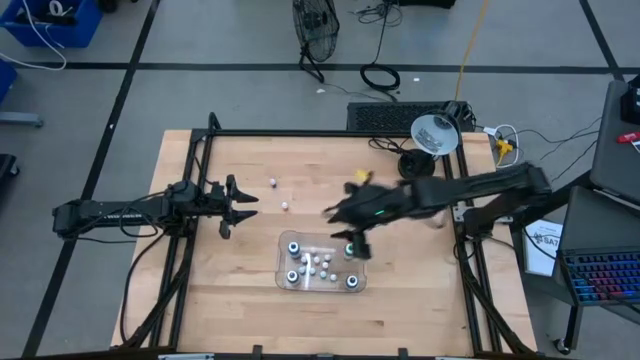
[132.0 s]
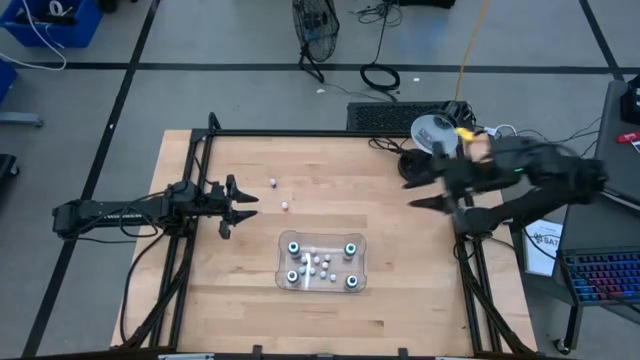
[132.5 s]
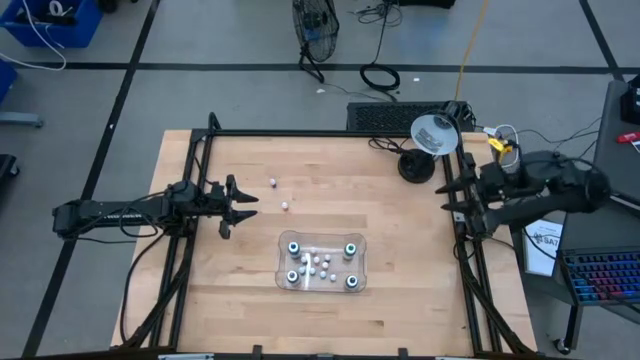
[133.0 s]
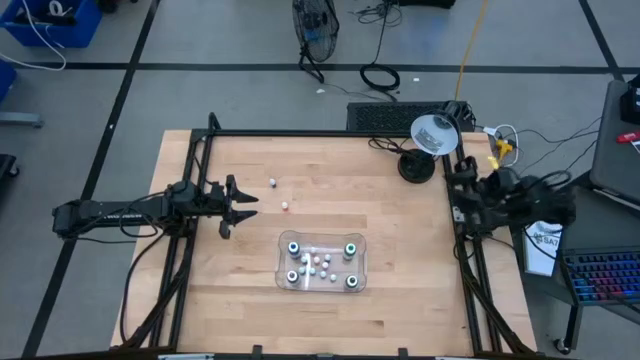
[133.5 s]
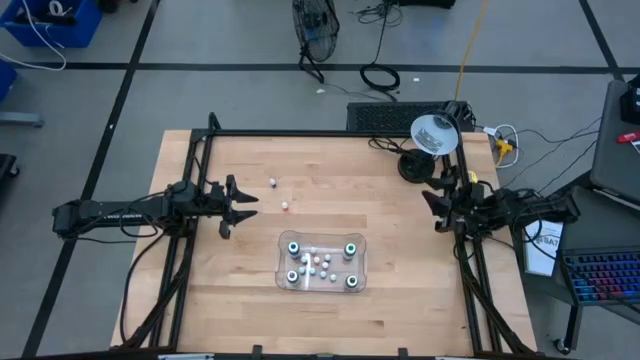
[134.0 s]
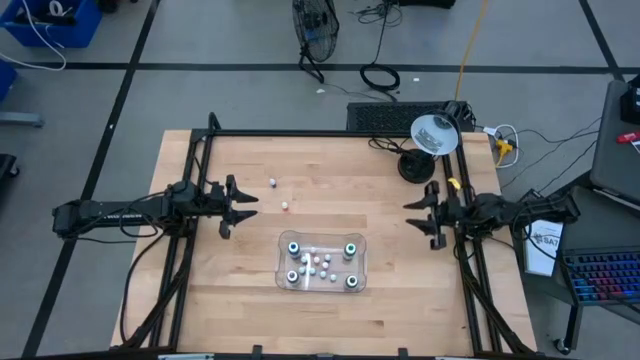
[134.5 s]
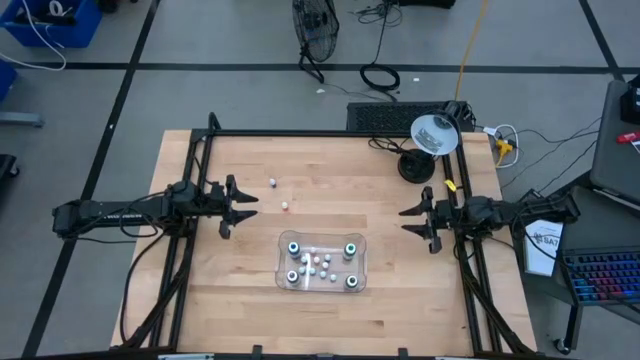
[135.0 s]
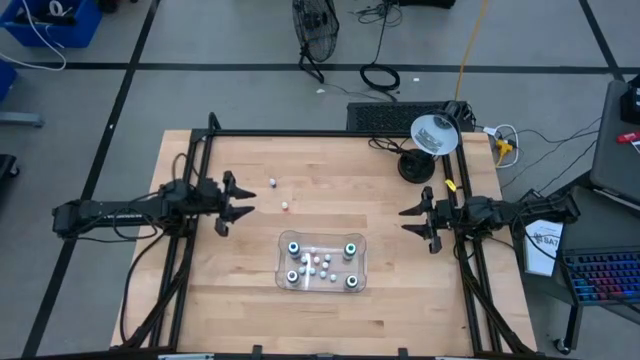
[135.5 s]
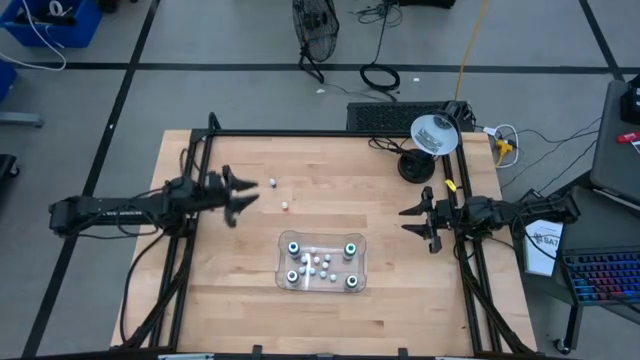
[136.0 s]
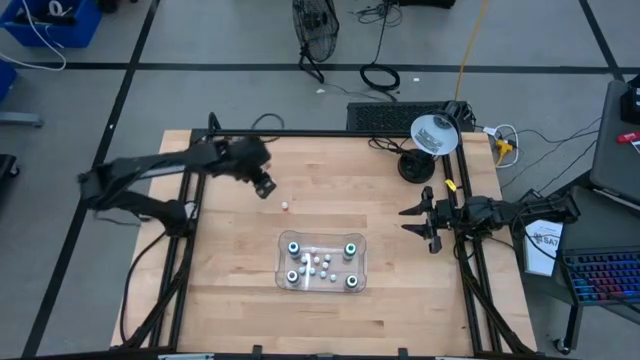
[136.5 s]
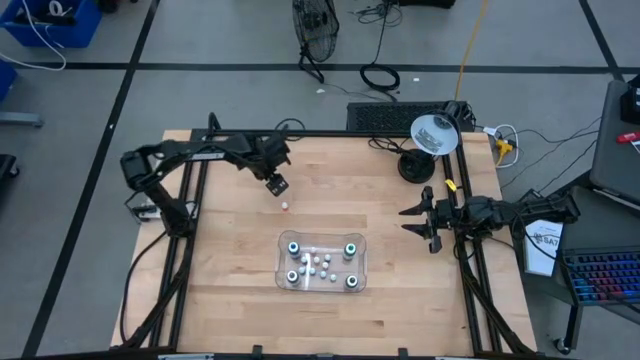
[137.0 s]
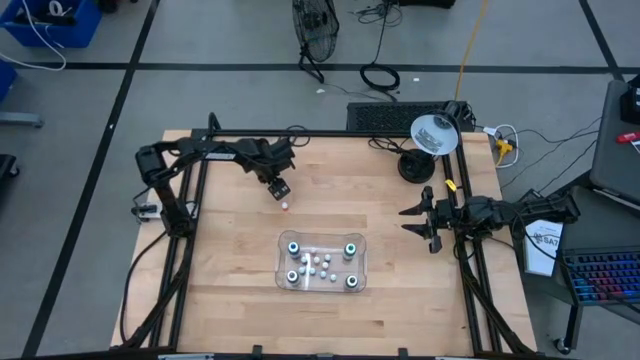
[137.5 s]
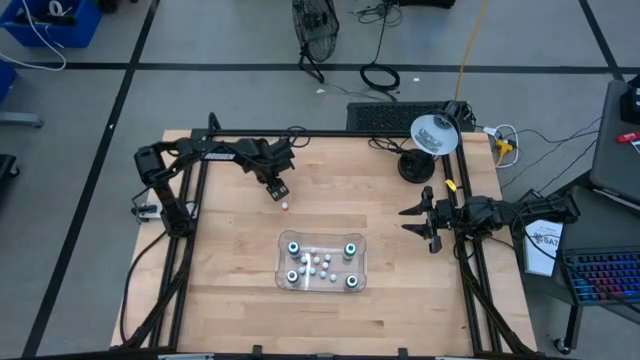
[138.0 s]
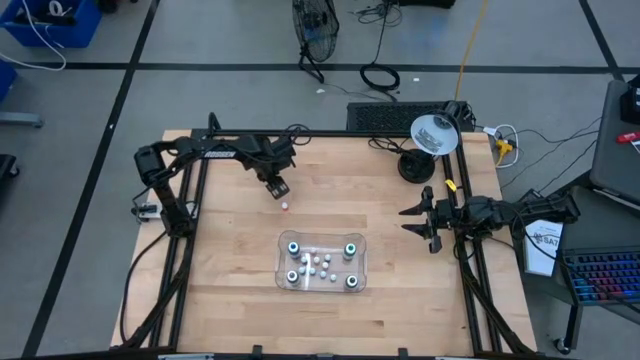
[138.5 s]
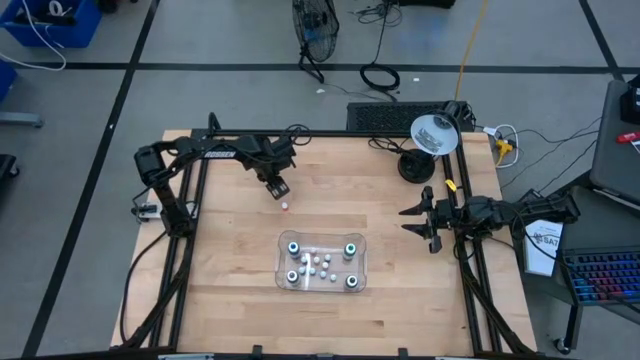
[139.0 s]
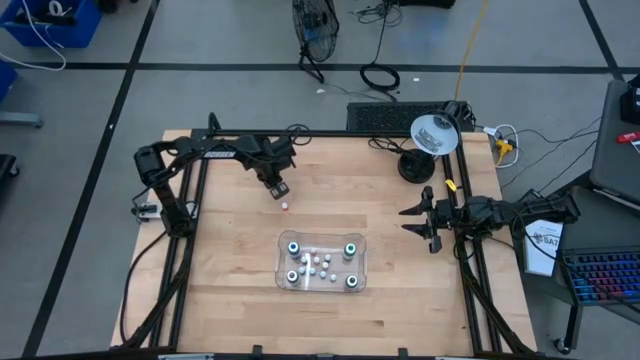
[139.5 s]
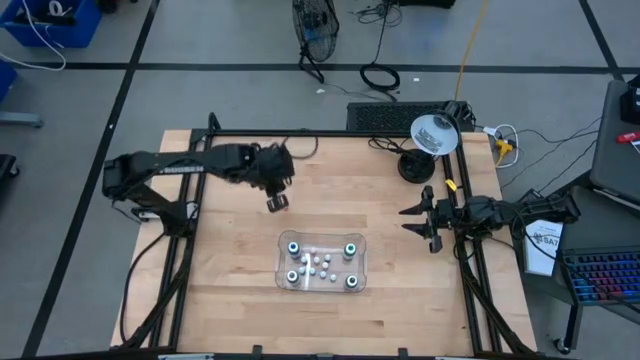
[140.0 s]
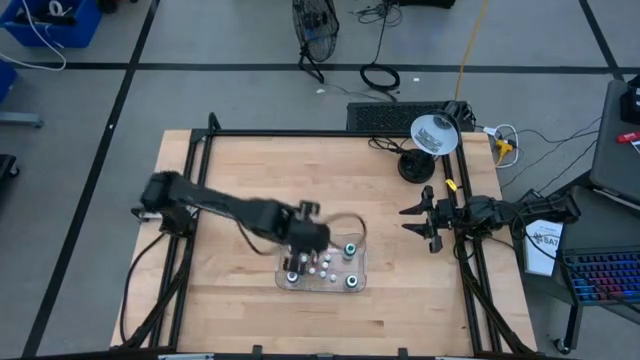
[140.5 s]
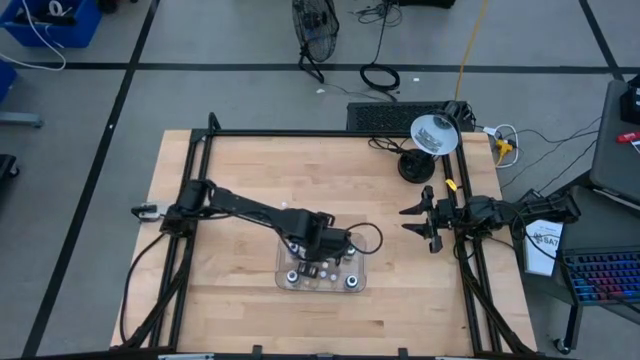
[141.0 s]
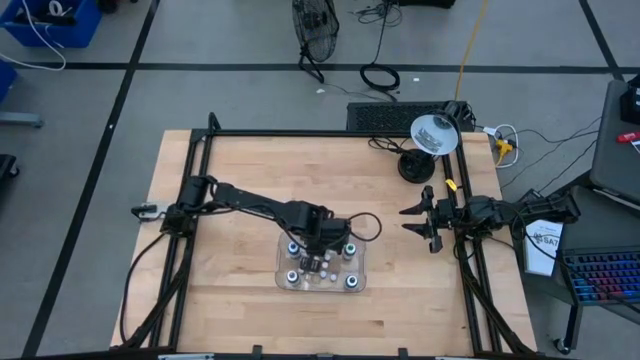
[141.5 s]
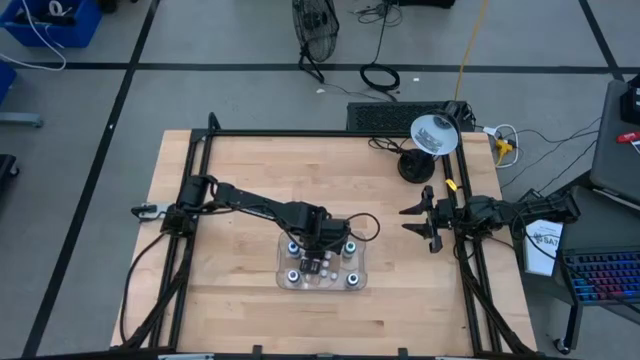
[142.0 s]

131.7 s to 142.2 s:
Task: Pick & Place food coloring
Put the small brown food coloring bottle into the bin

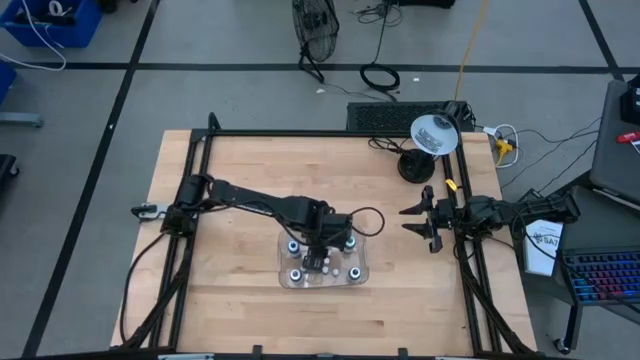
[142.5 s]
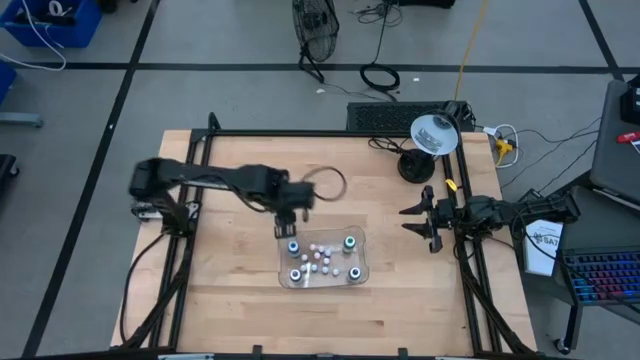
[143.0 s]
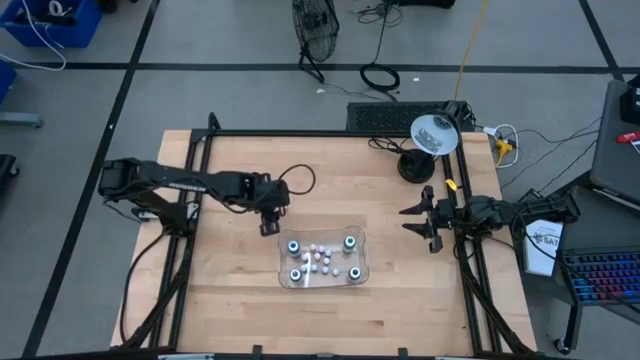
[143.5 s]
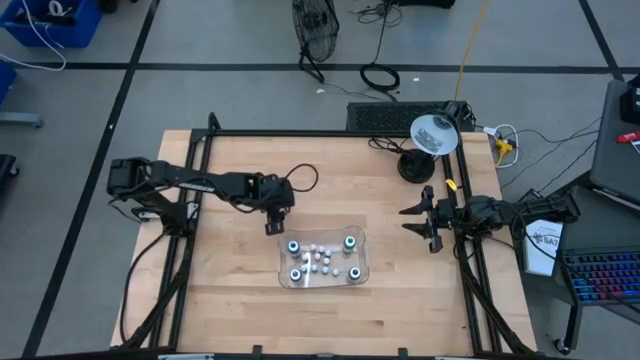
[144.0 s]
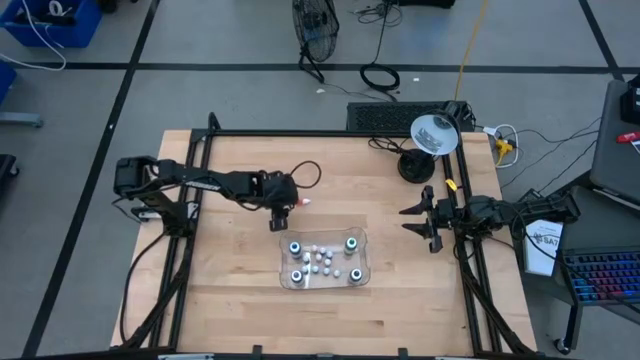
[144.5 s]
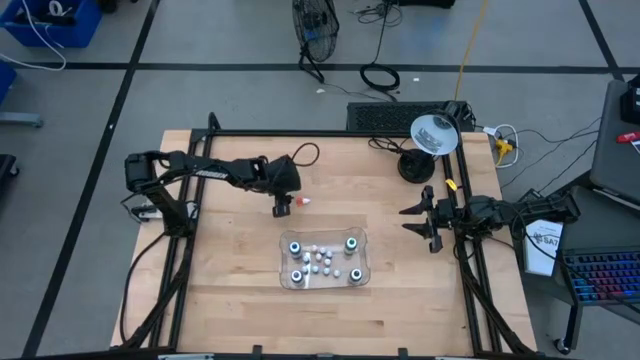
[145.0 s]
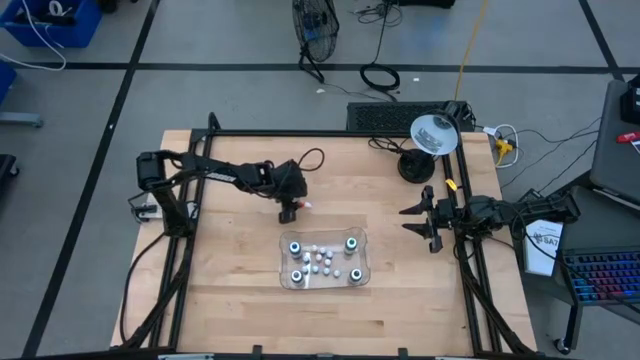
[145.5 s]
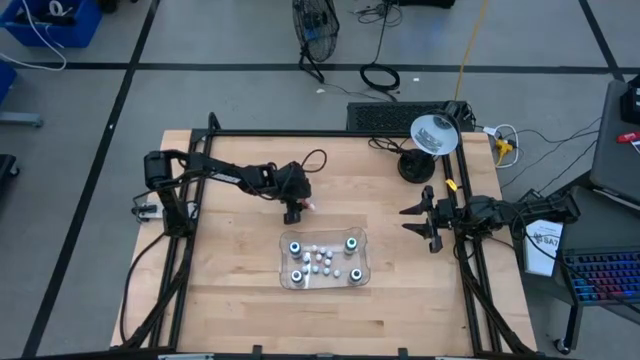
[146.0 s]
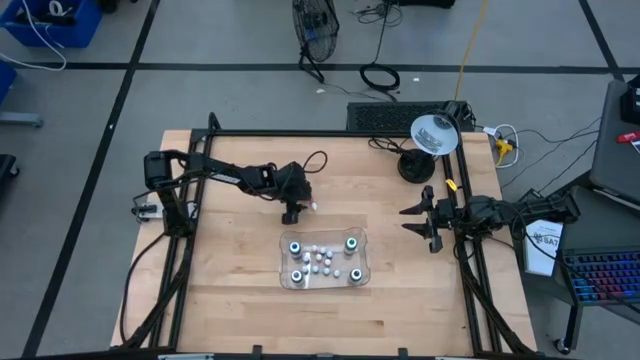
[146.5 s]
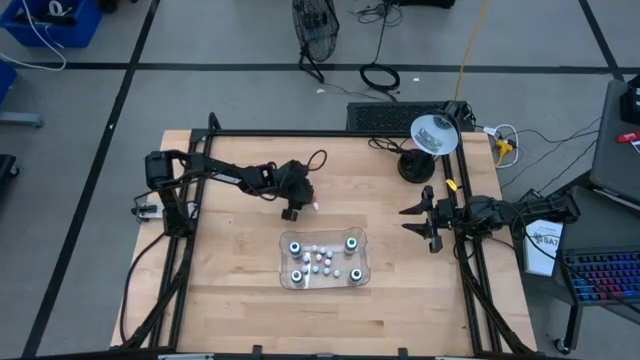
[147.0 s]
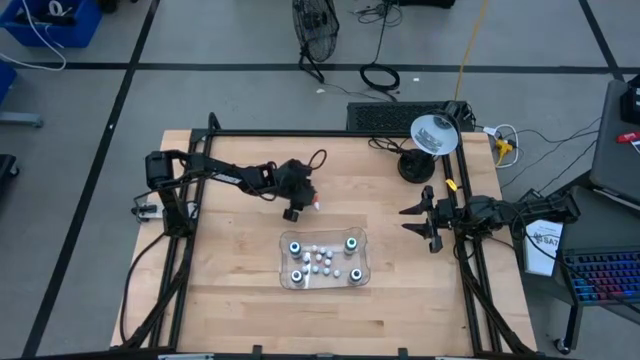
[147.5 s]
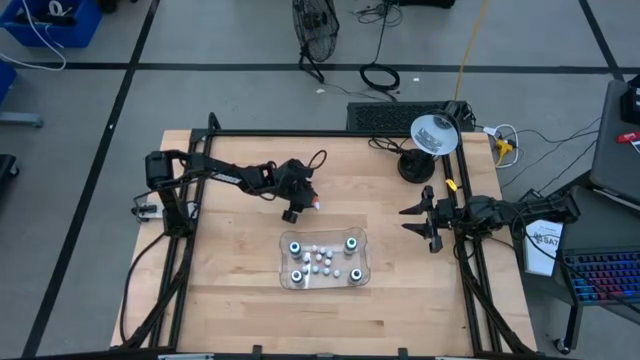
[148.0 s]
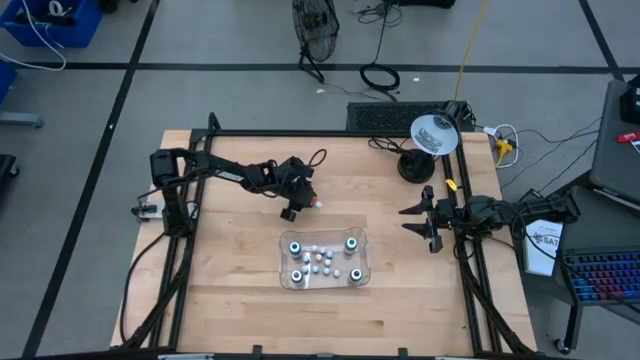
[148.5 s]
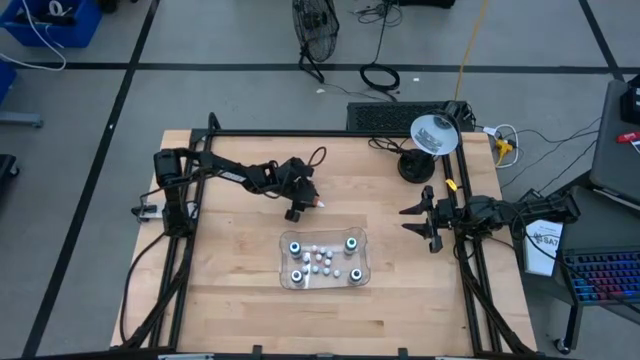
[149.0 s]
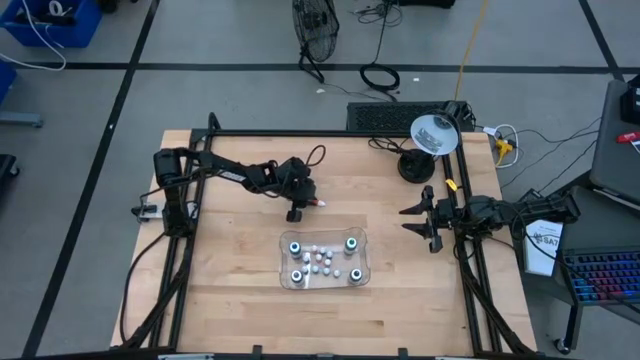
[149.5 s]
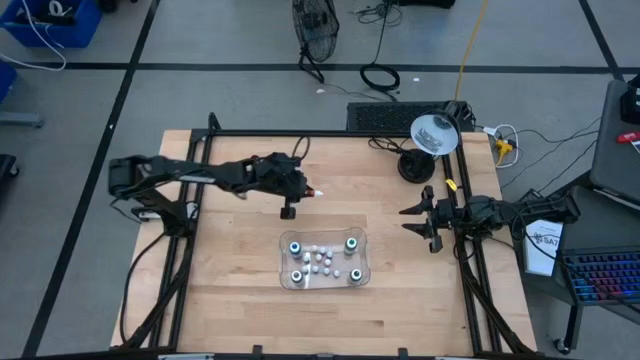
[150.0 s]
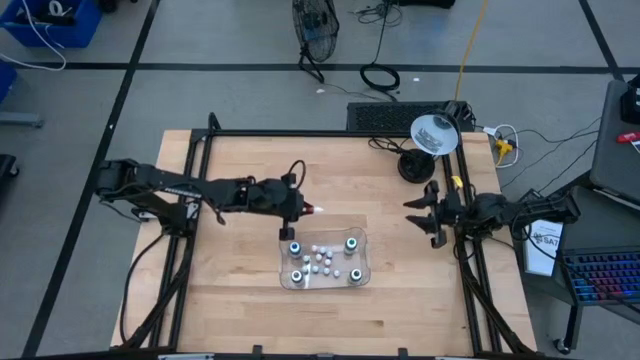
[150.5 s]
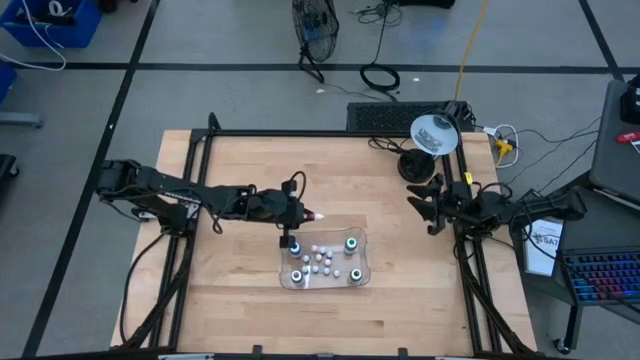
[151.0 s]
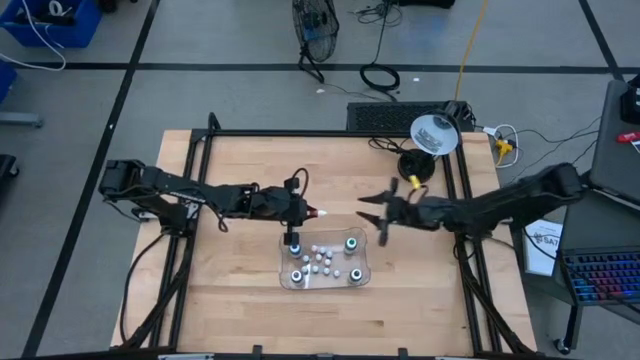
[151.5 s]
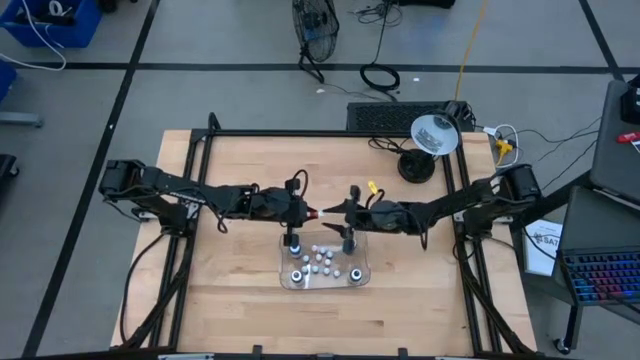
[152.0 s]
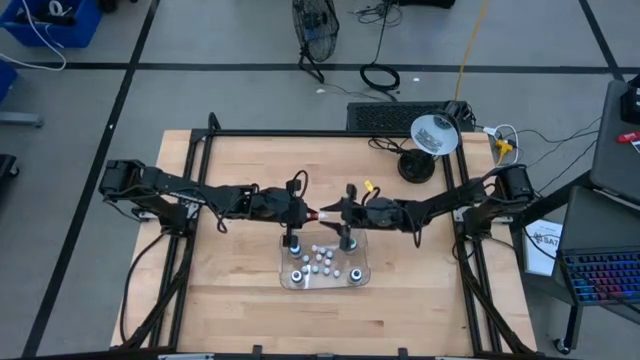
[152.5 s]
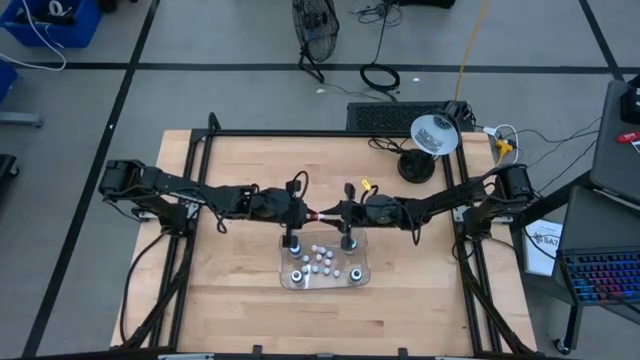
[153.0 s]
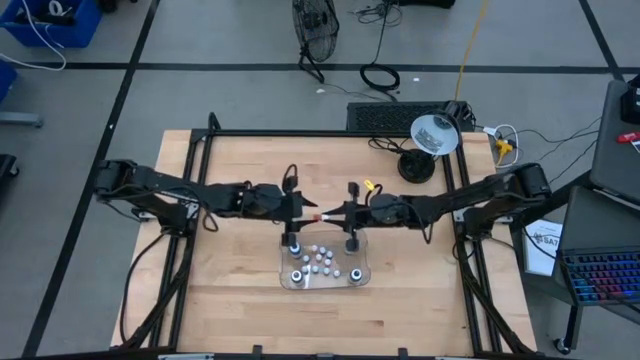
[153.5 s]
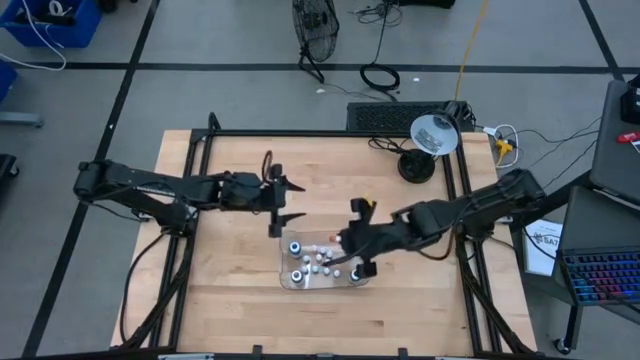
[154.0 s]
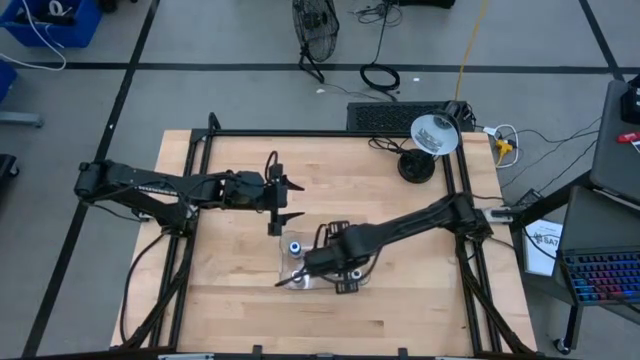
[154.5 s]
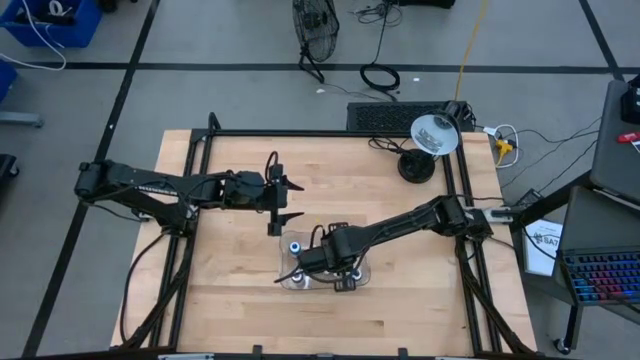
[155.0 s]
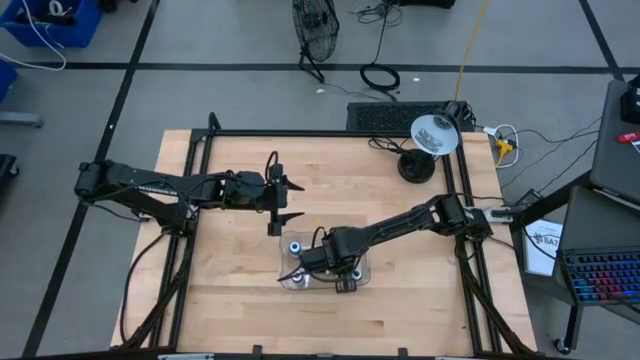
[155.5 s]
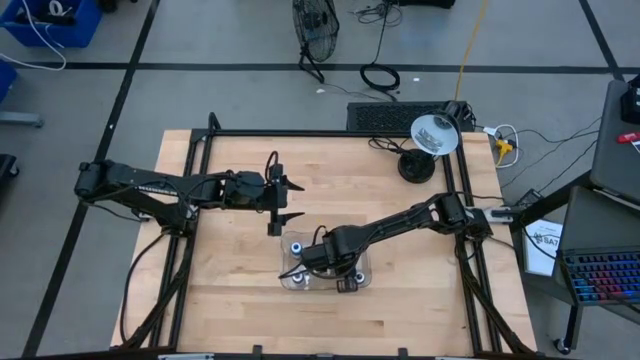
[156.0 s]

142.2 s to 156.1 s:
Put the small orange food coloring bottle into the bin
